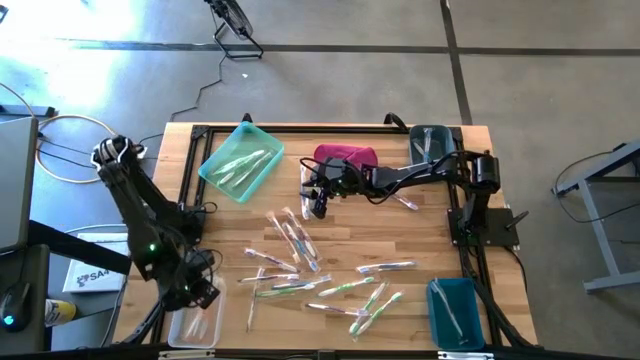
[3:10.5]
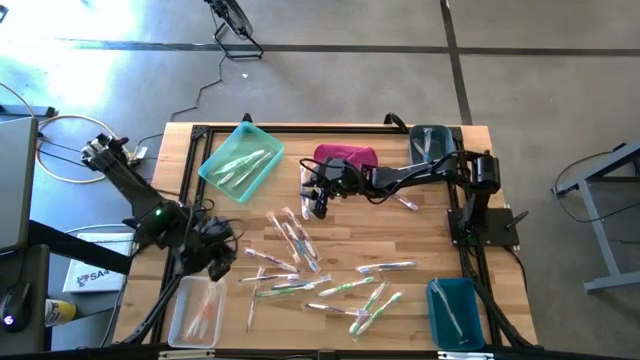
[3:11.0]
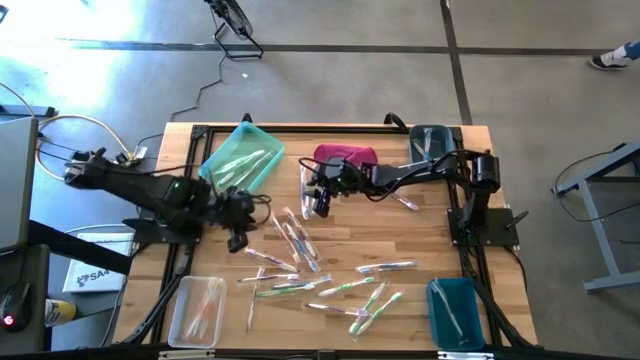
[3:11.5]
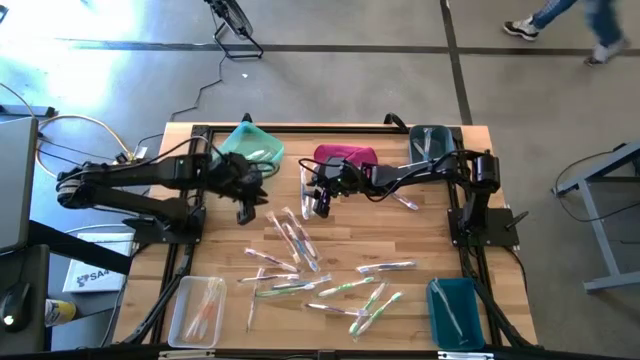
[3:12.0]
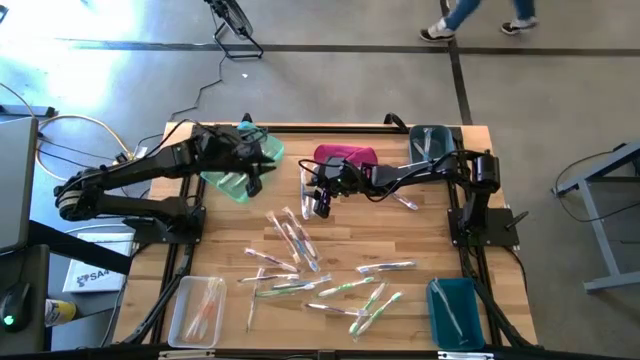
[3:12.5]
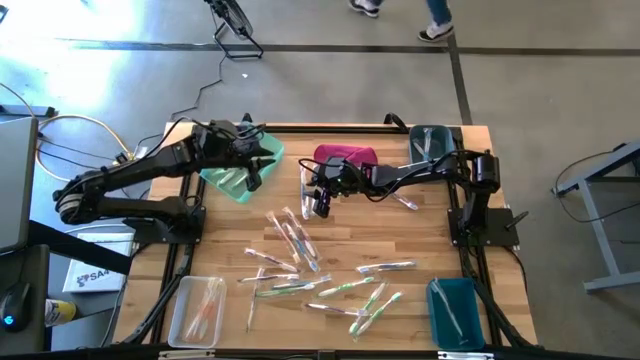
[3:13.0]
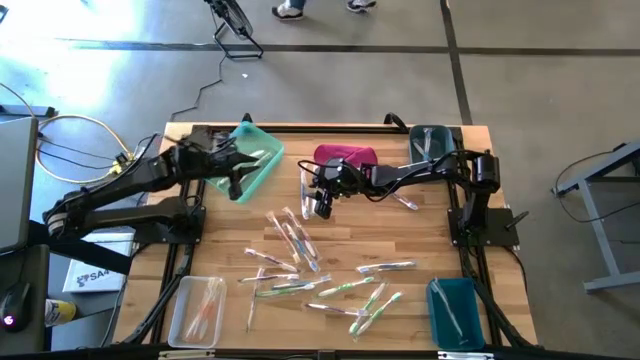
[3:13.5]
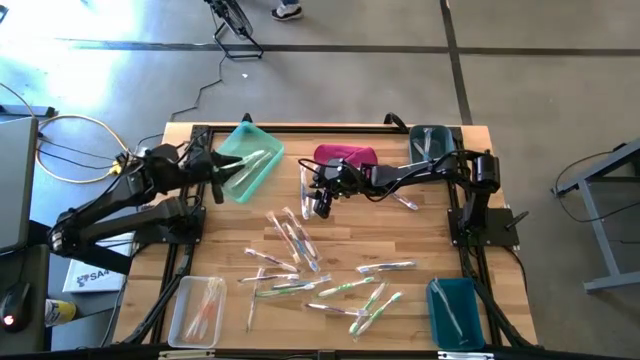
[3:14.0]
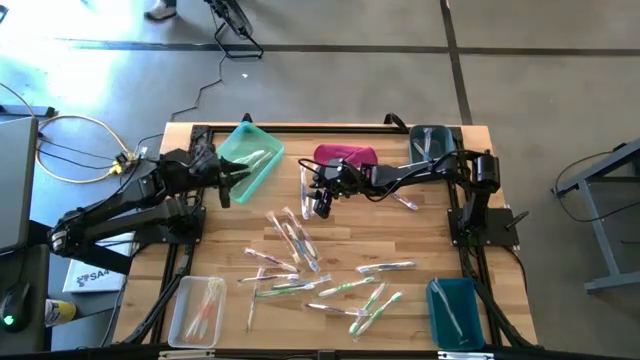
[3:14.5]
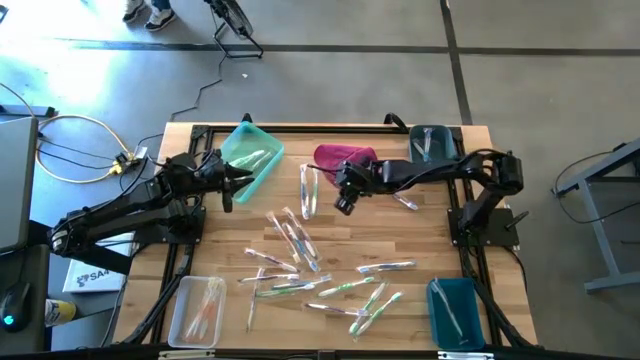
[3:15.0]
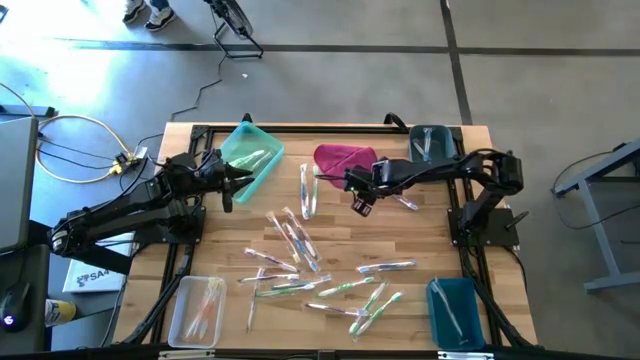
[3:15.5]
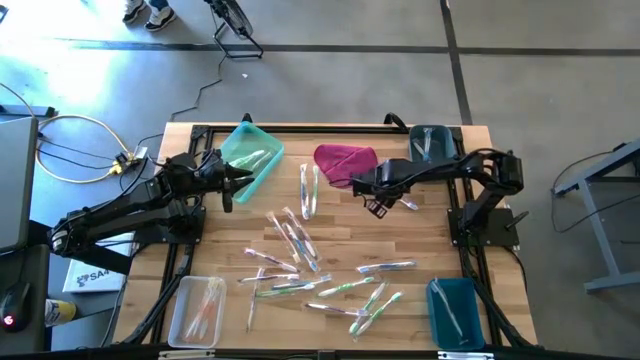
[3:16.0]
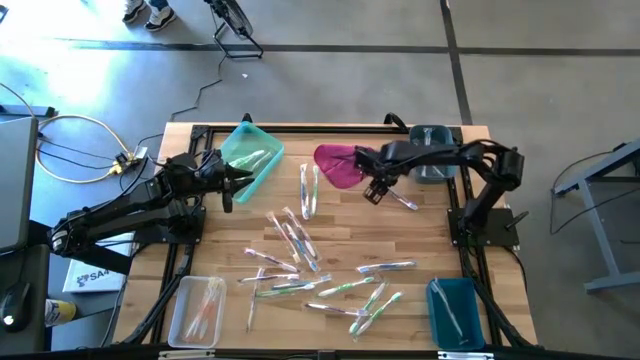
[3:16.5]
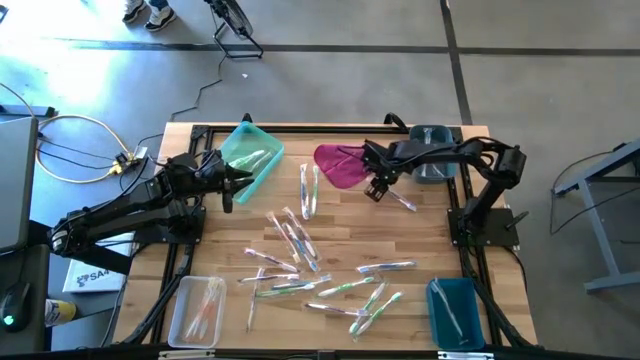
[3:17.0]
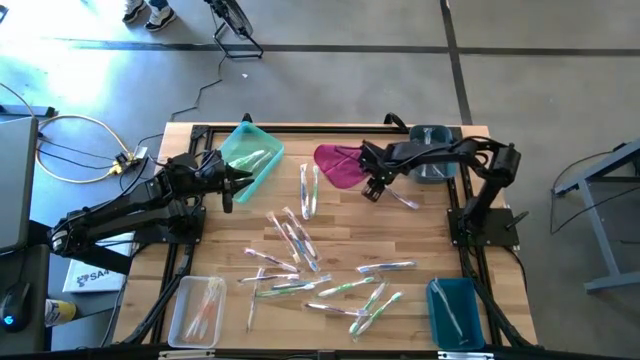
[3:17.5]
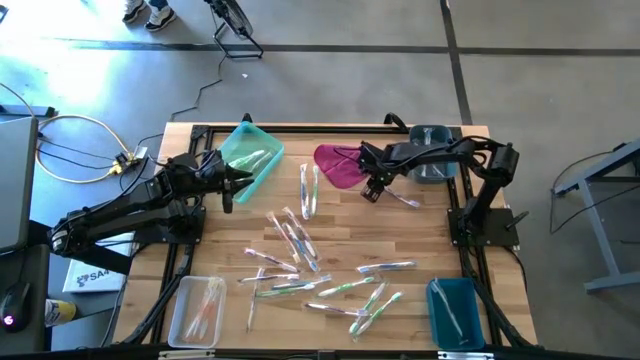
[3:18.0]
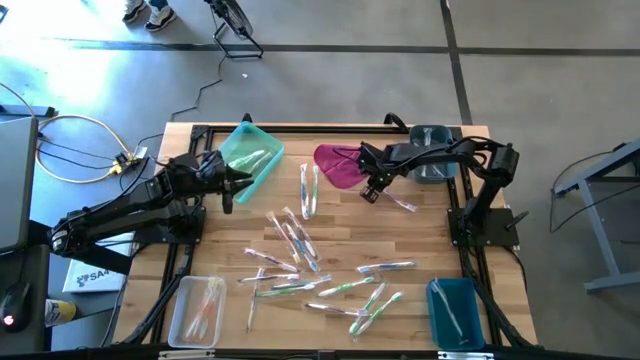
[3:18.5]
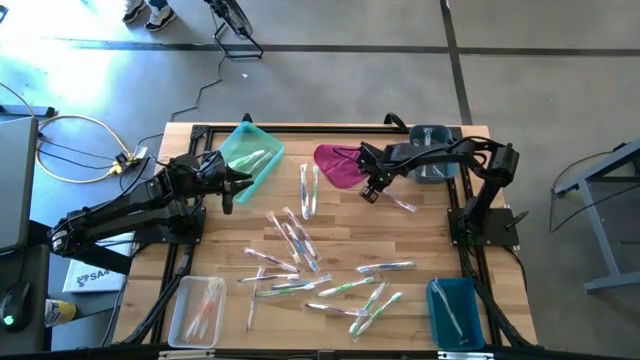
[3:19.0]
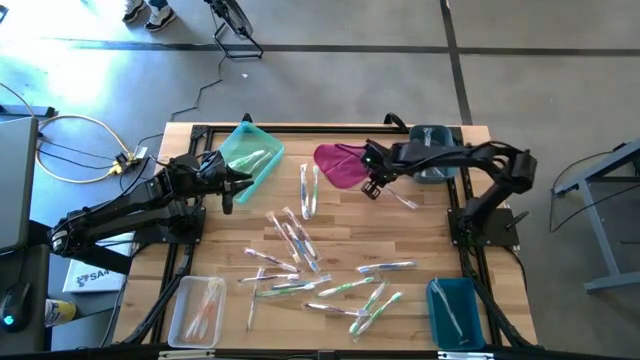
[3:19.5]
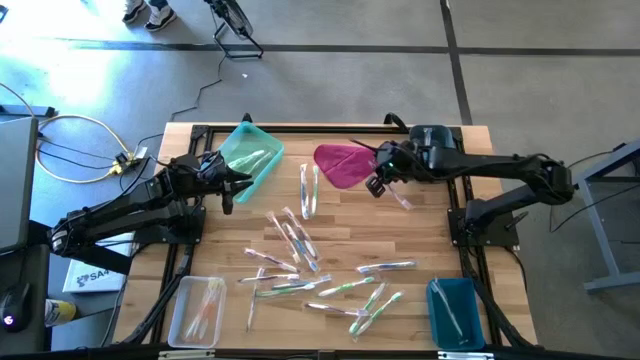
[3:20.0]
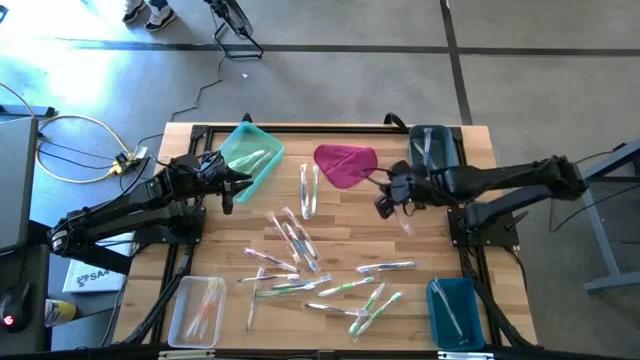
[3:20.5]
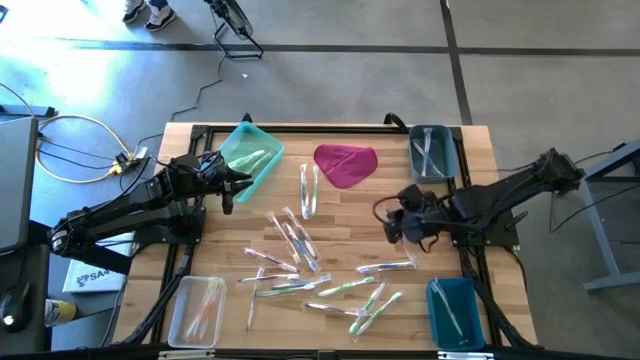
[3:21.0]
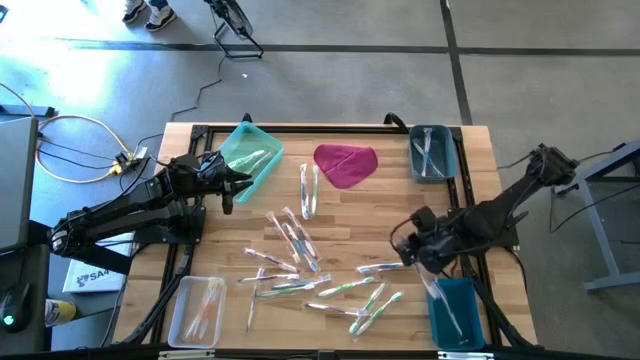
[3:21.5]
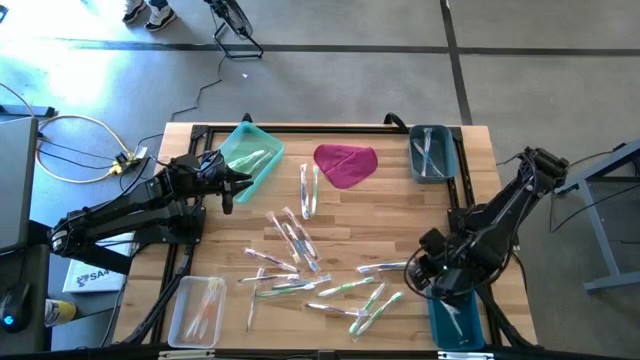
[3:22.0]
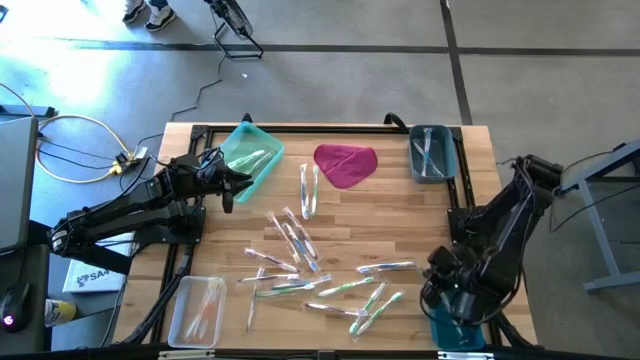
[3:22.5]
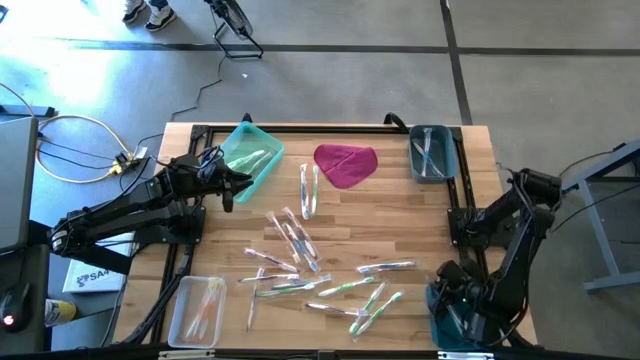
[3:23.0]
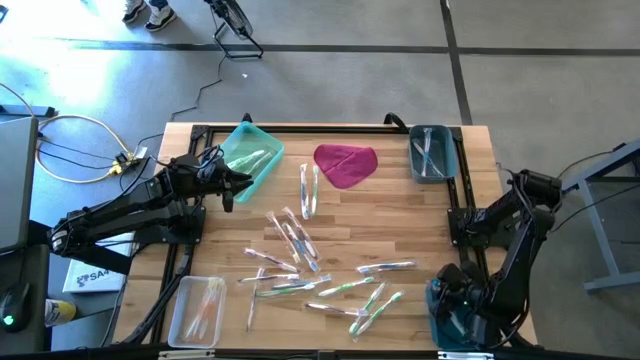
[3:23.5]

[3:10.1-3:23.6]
Task: Pick & Place Toothbrushes
Put the purple toothbrush to the dark blue bin bin

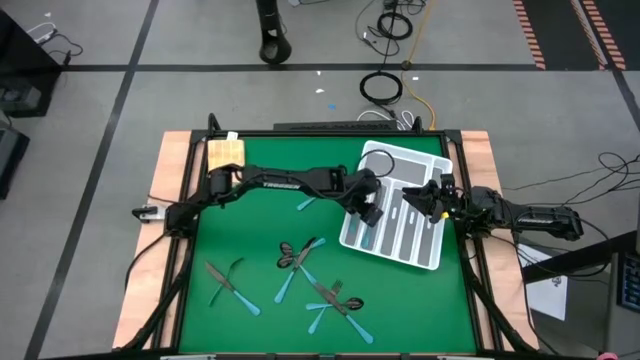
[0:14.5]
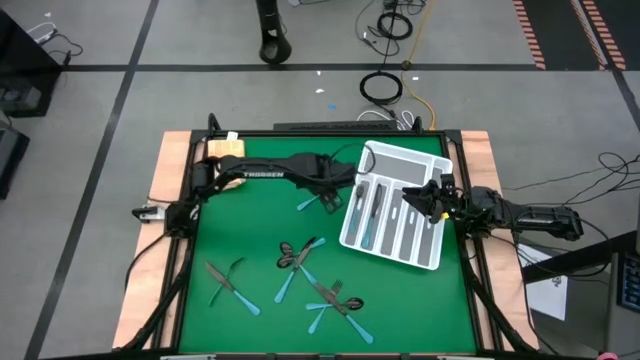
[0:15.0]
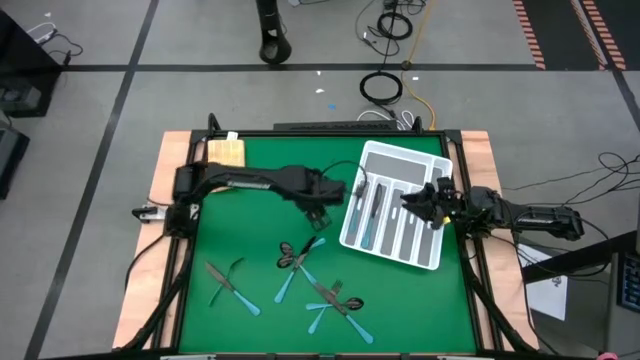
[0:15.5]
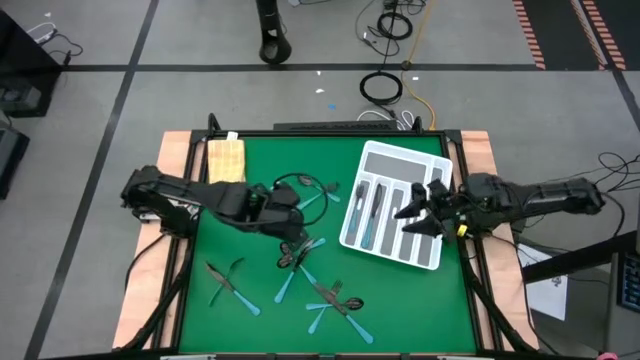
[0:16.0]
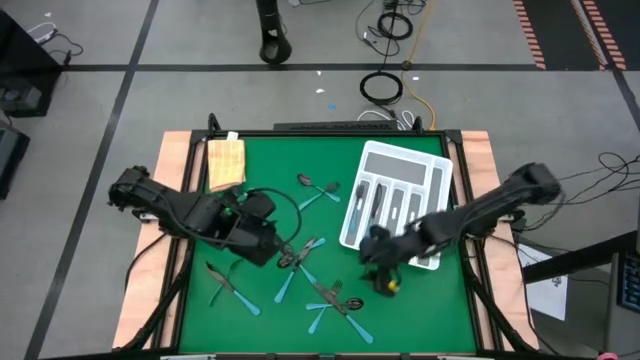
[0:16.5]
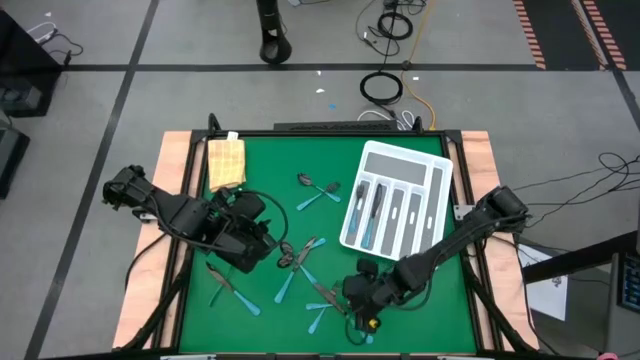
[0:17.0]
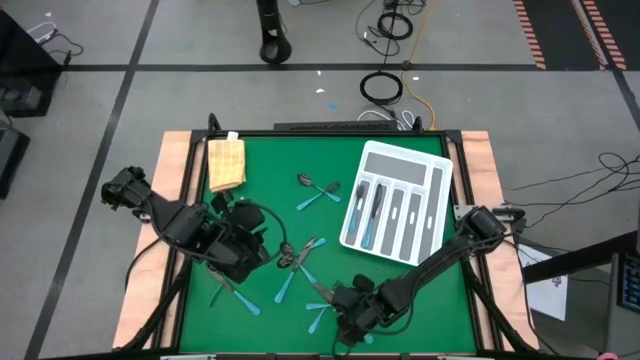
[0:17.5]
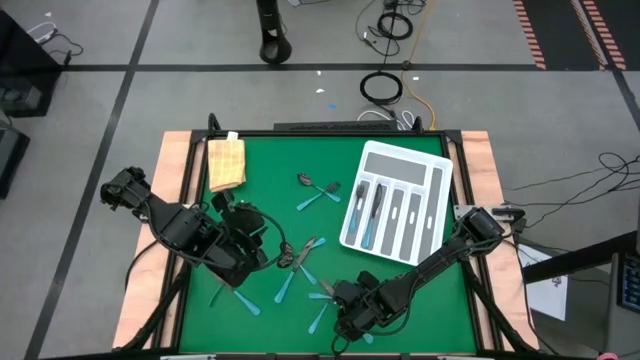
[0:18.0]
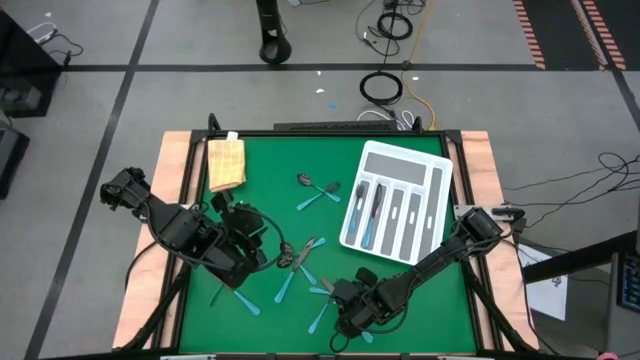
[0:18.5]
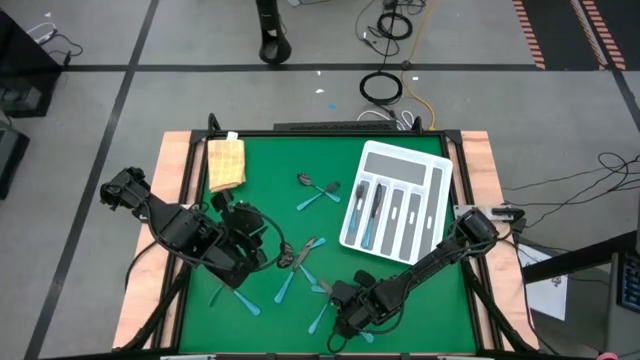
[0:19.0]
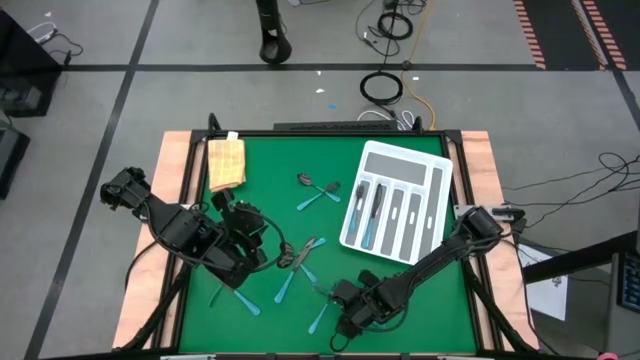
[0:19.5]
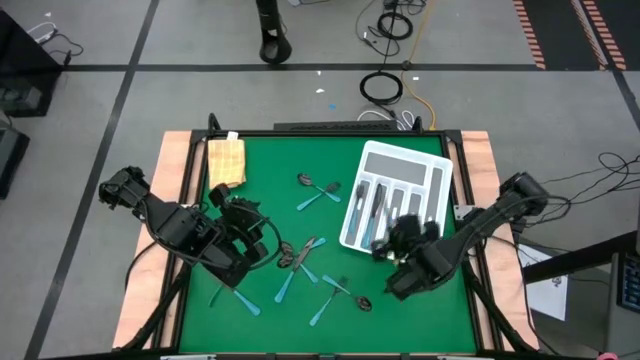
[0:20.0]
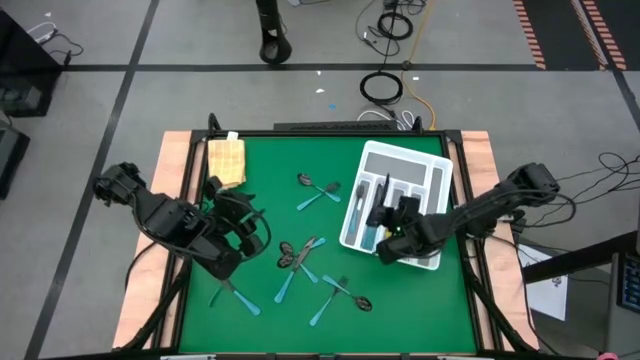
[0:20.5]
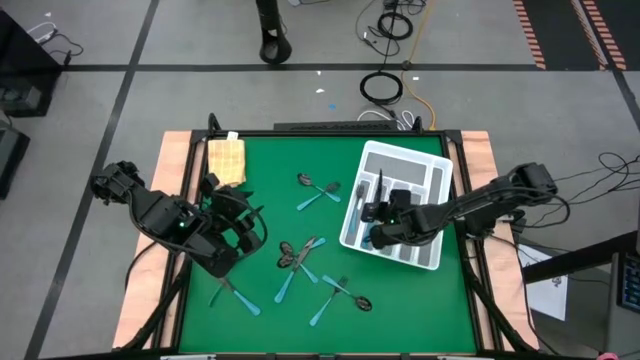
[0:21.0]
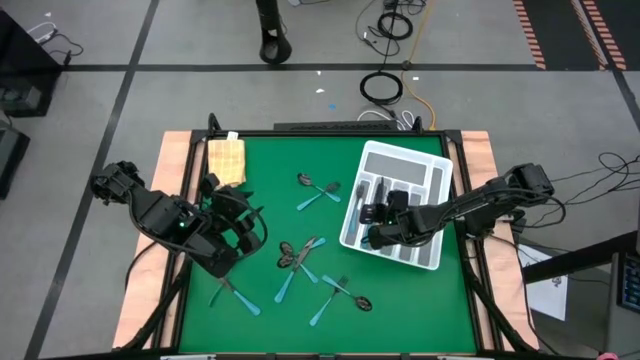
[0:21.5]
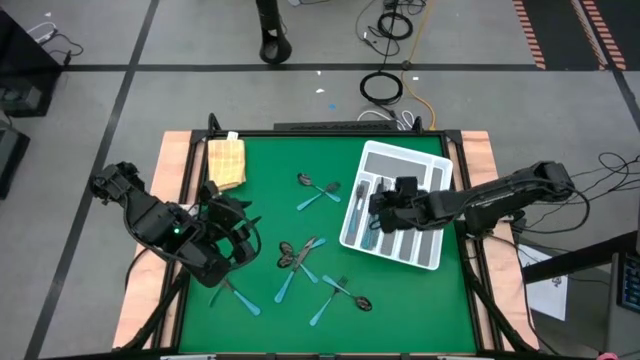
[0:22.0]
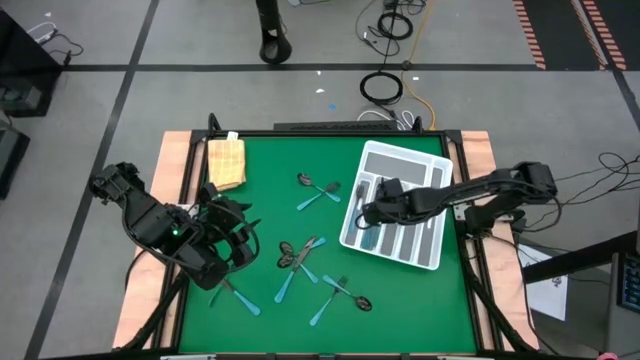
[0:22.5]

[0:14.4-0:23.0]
Task: Sort silverware
Put the blue table knife into the white cutlery tray
